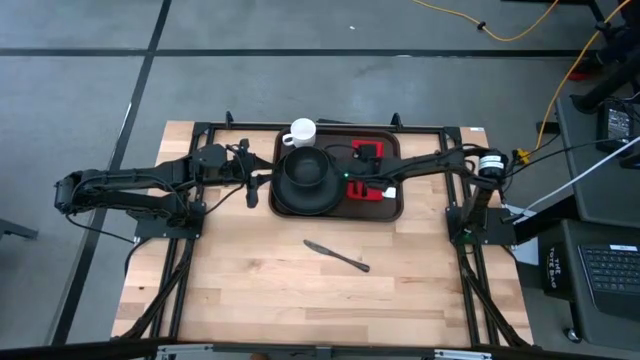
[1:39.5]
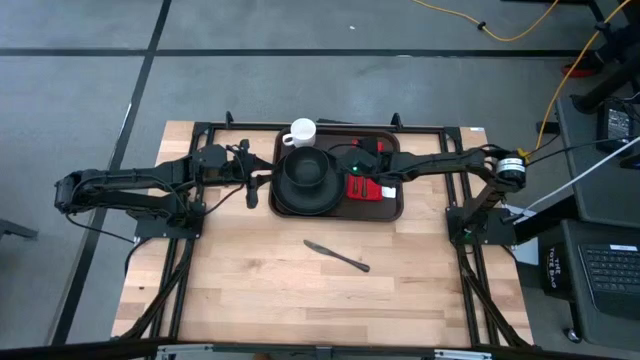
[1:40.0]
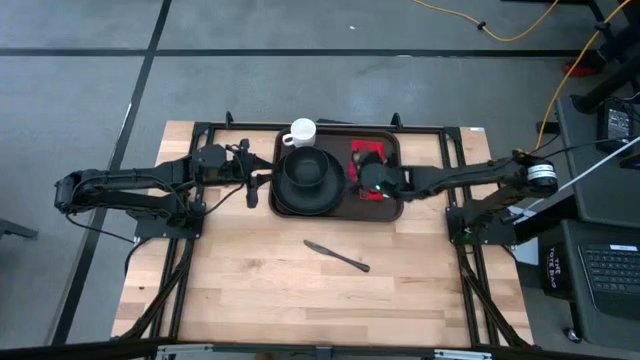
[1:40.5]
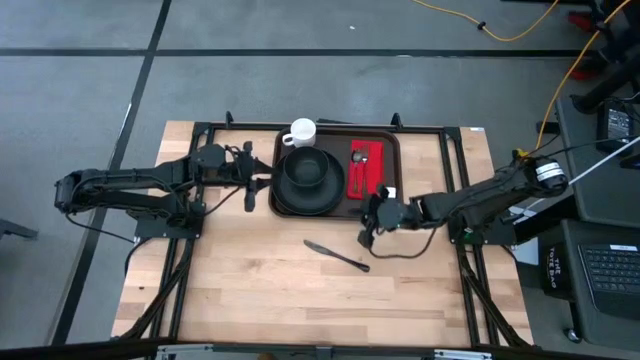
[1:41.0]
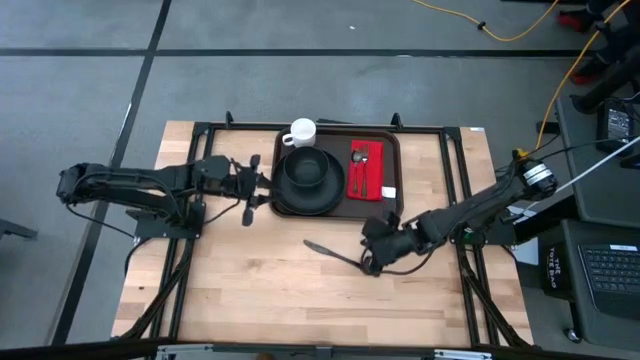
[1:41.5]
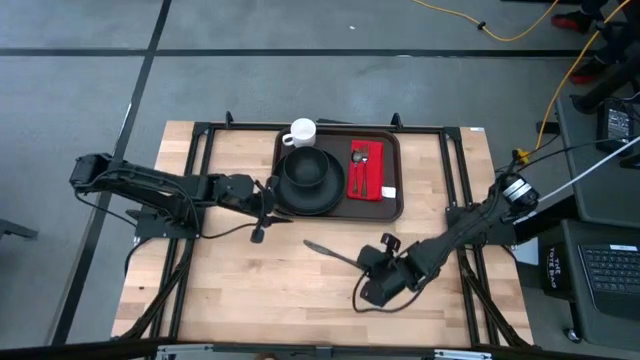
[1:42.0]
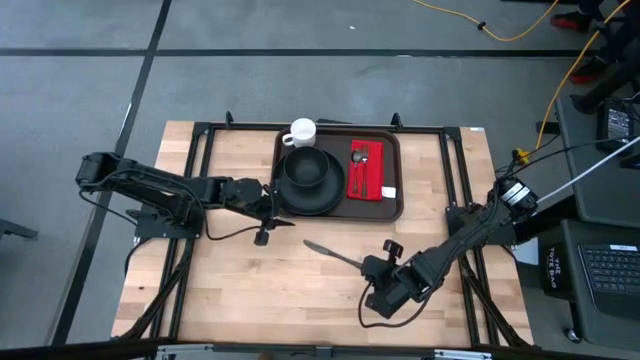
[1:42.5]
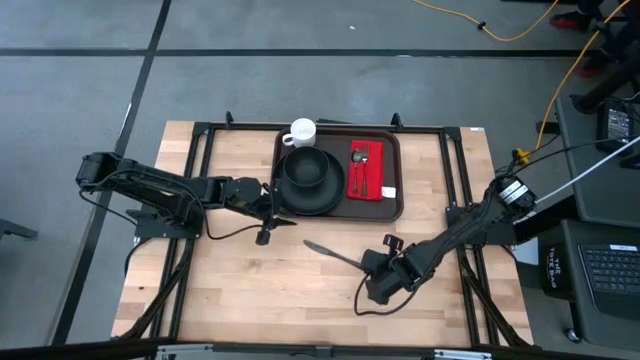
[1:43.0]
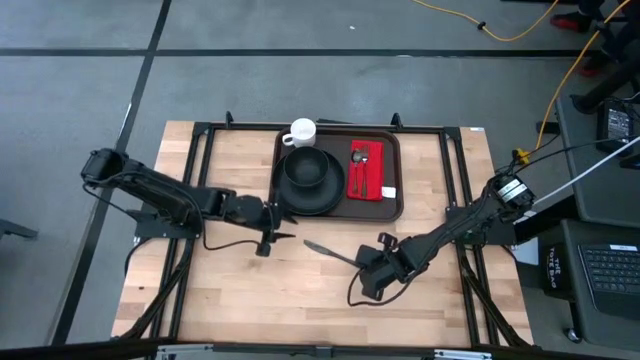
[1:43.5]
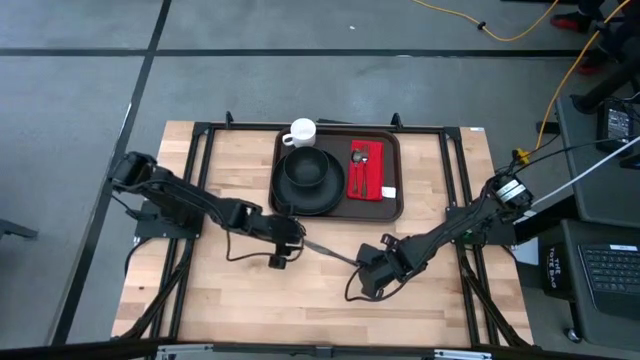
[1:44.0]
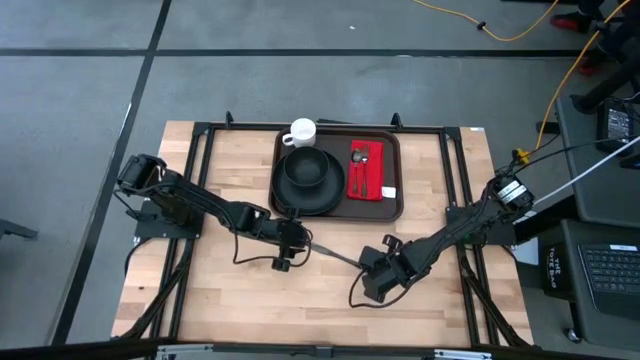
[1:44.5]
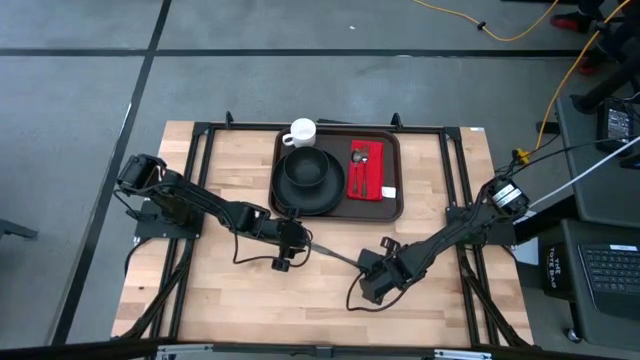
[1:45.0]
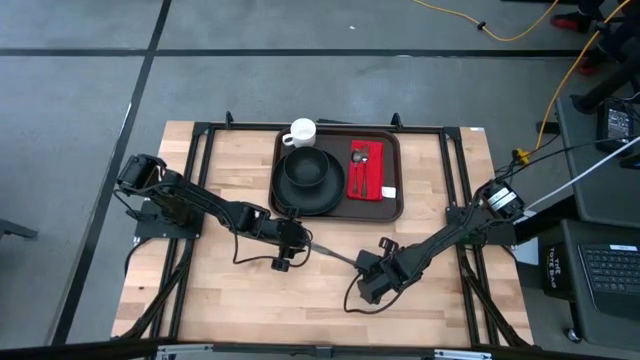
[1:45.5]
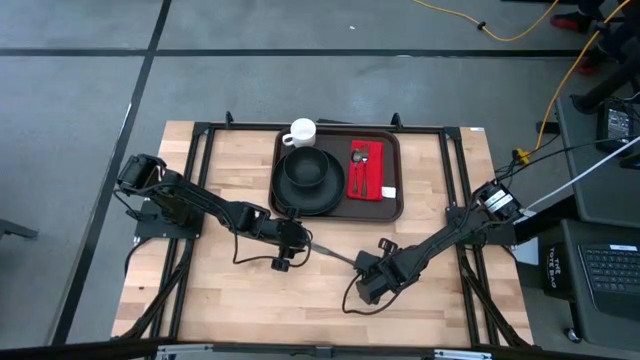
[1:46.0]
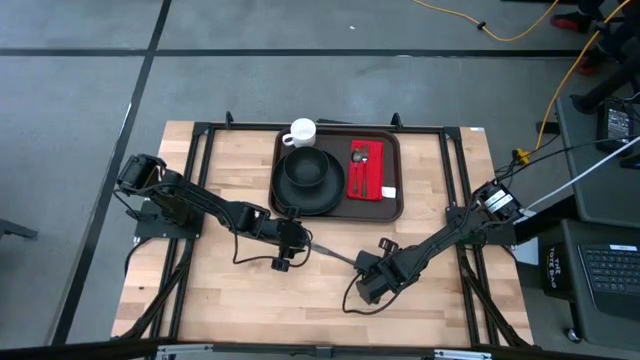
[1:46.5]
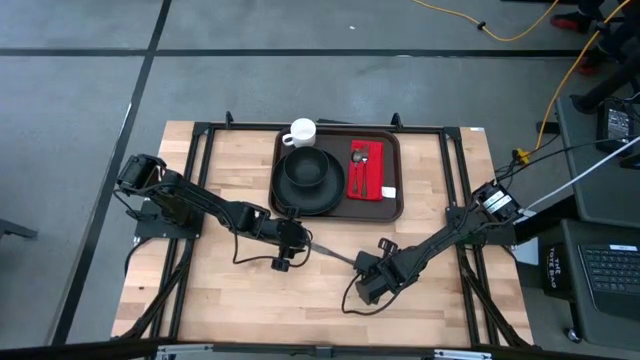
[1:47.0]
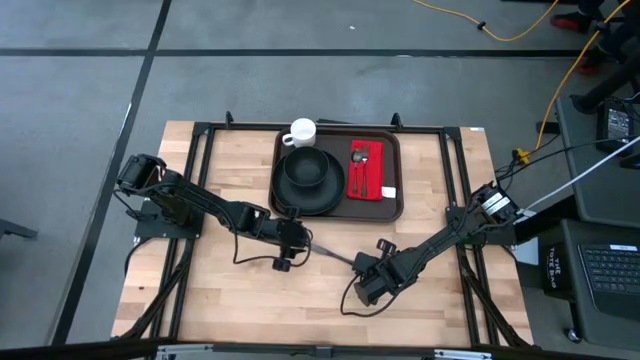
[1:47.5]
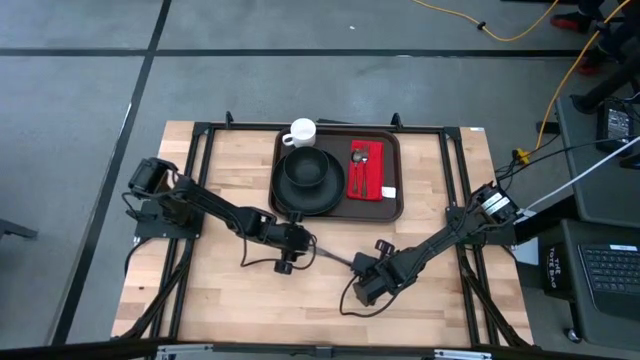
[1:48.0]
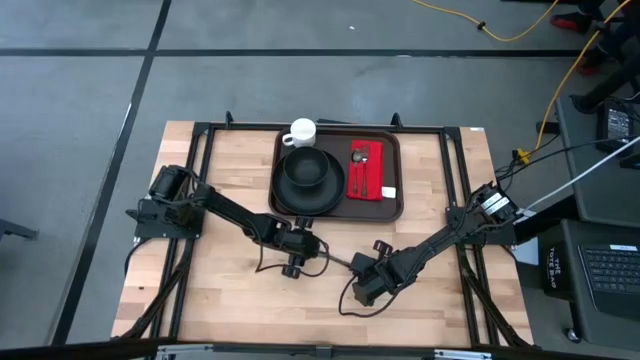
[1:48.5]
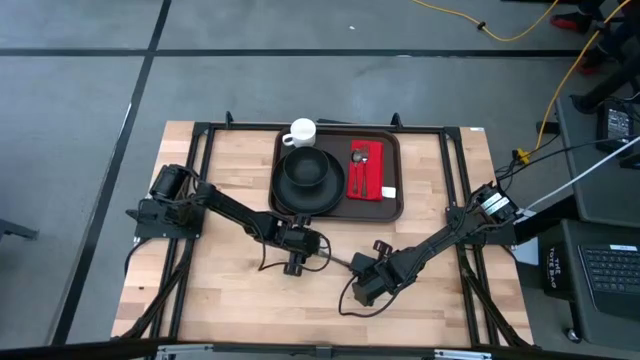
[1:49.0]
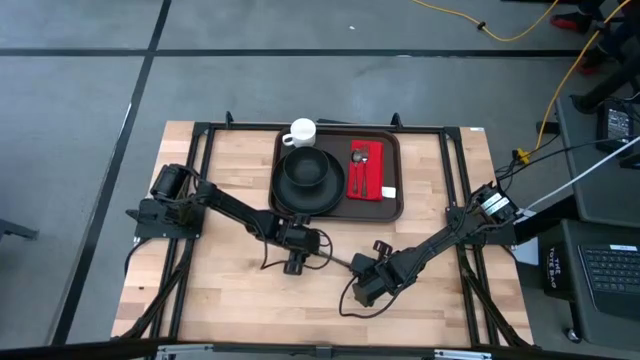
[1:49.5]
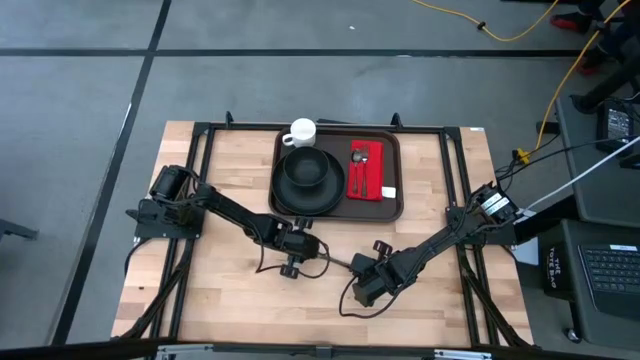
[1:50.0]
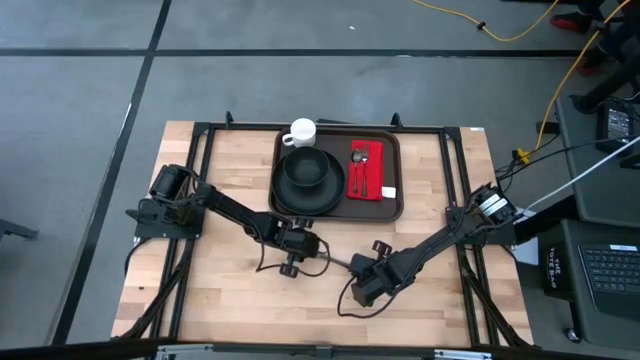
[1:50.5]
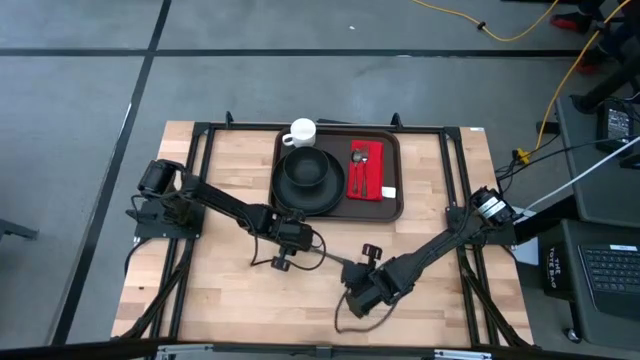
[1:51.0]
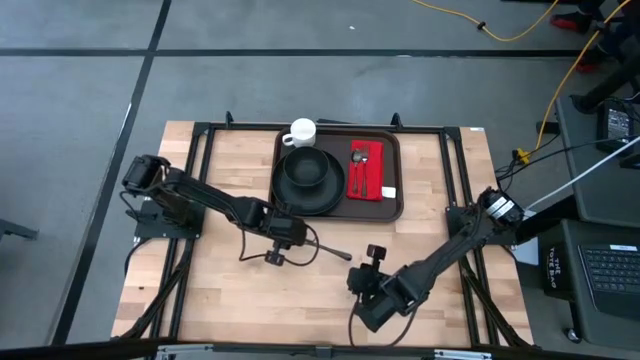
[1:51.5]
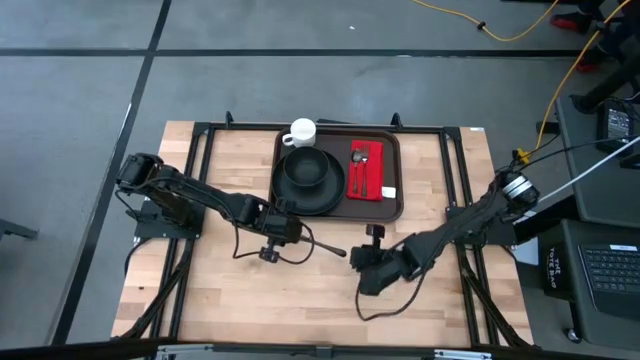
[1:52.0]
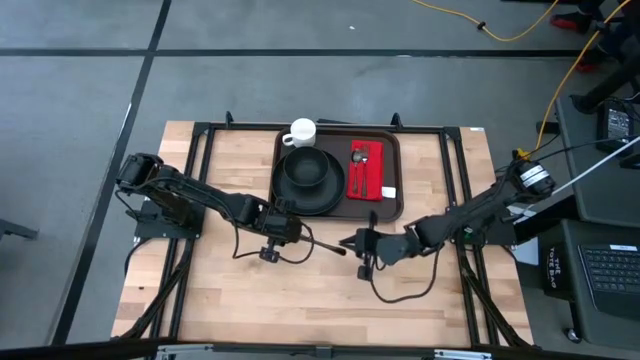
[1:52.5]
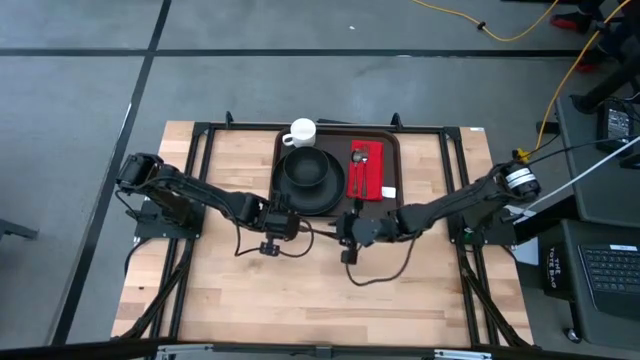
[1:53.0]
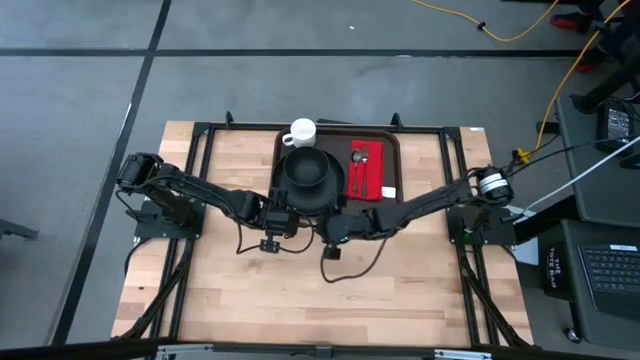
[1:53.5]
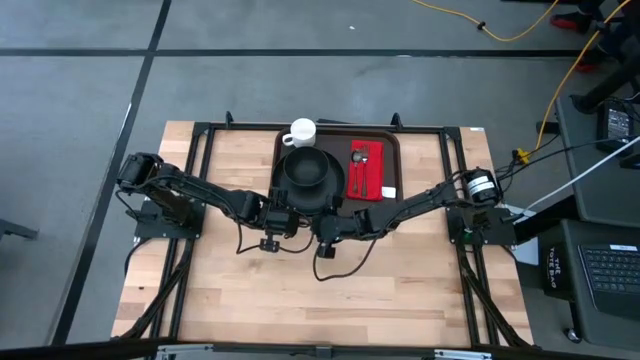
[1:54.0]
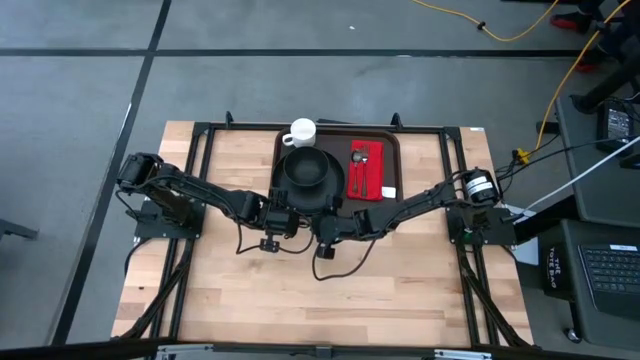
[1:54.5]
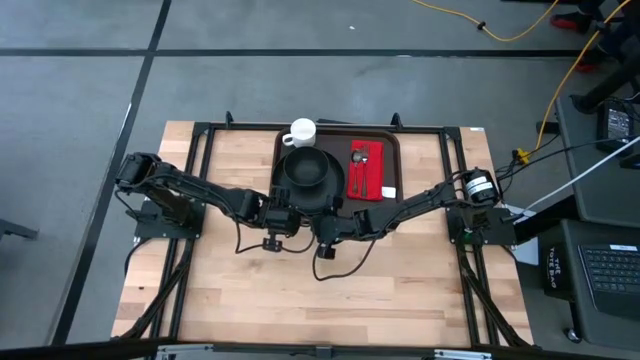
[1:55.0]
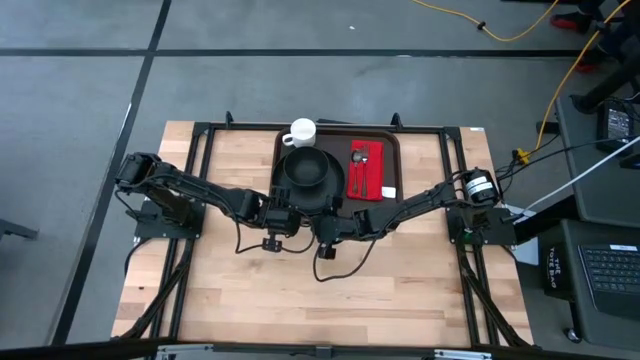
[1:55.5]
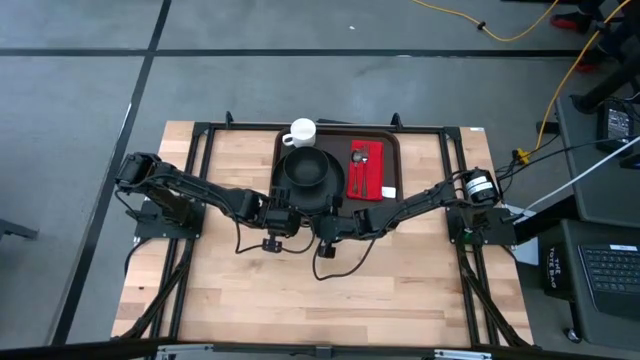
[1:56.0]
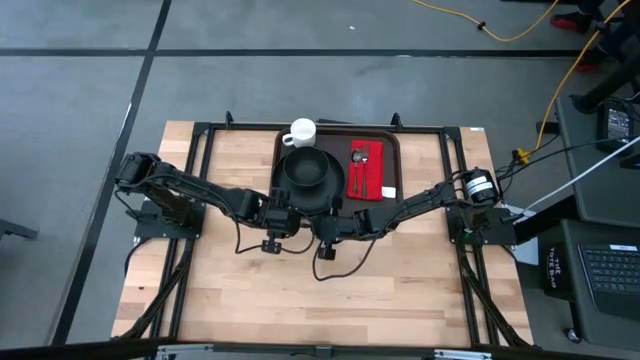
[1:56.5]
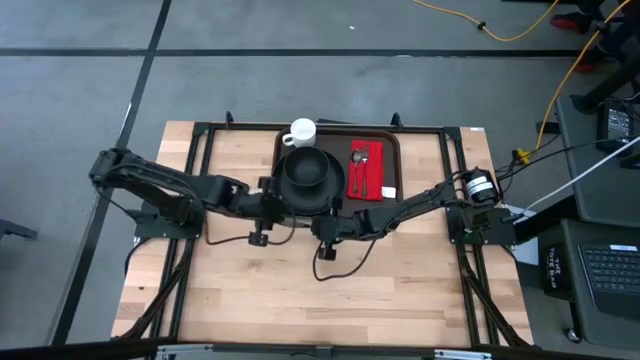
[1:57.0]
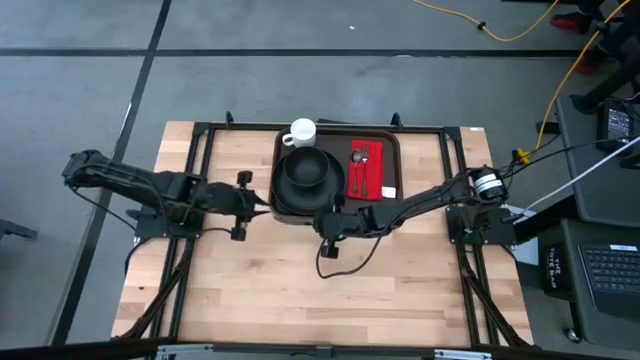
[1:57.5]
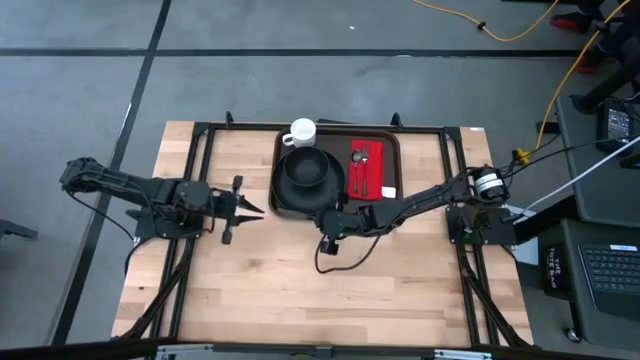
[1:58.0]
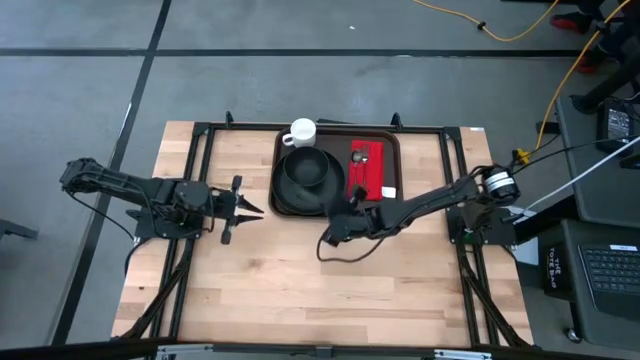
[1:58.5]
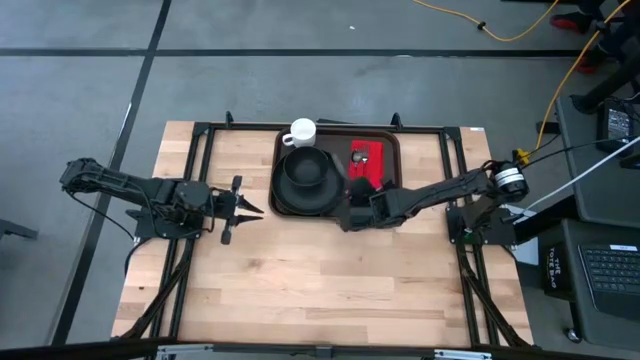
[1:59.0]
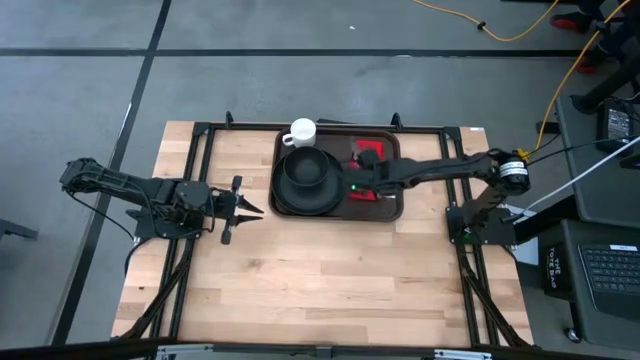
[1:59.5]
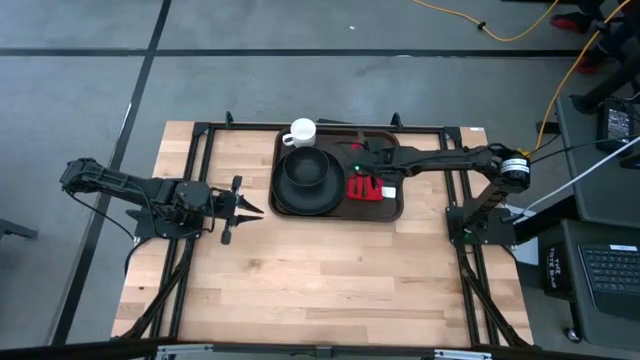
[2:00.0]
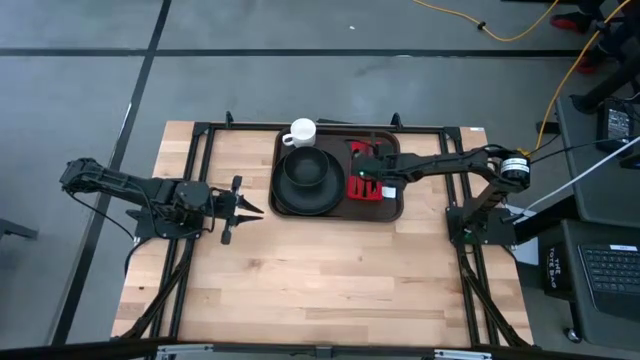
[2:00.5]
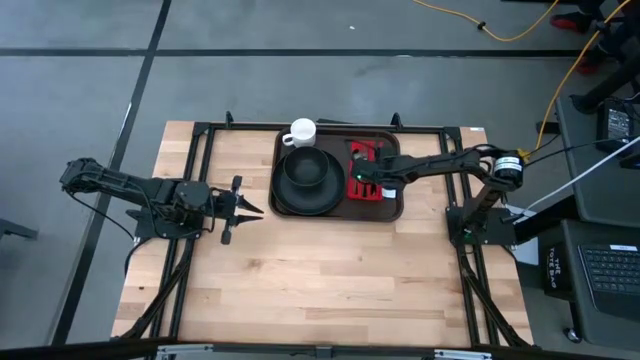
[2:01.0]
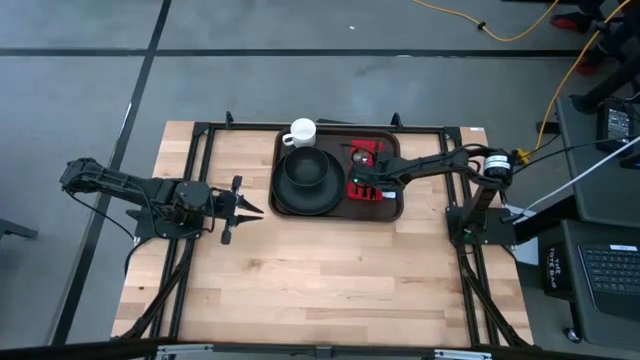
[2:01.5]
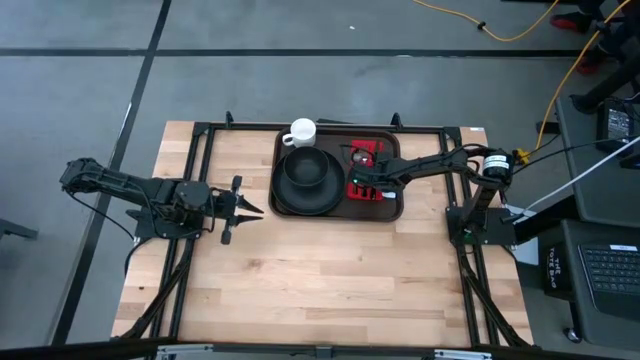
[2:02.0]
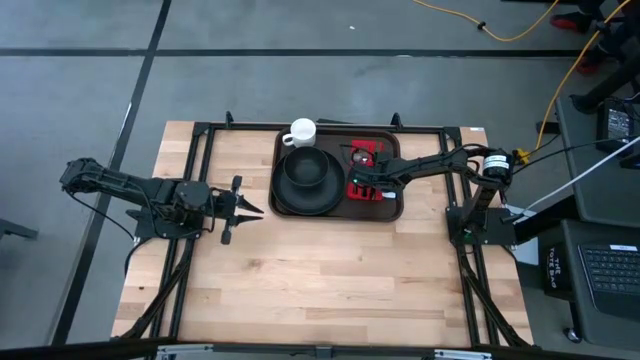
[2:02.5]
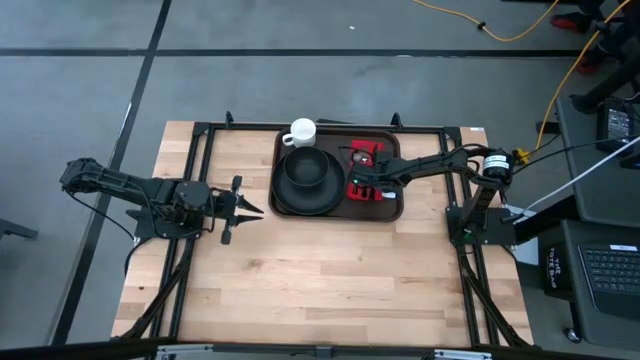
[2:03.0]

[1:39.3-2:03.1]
Task: Set up tray
Put the black table knife on the red table napkin to the right of the black fork
